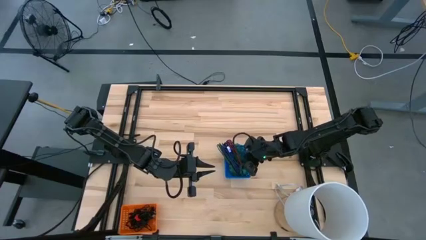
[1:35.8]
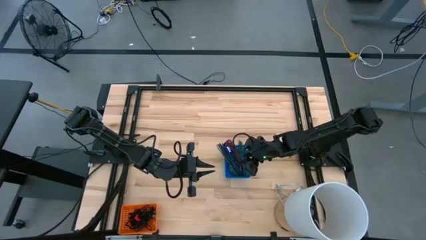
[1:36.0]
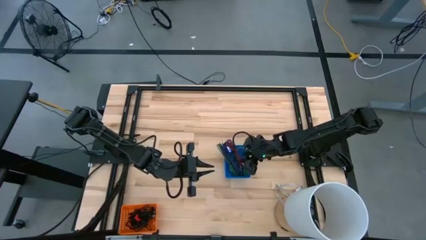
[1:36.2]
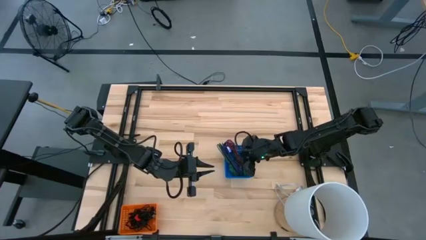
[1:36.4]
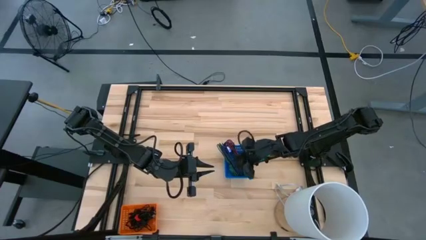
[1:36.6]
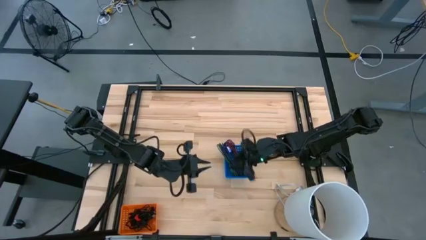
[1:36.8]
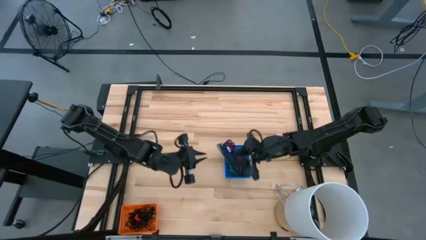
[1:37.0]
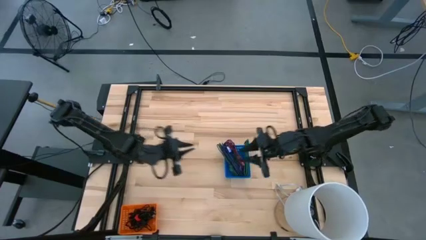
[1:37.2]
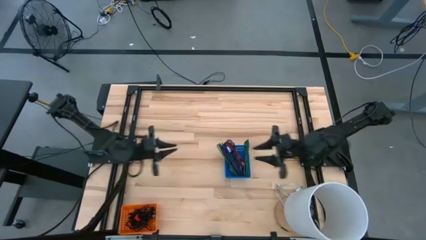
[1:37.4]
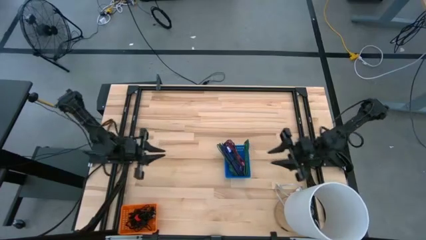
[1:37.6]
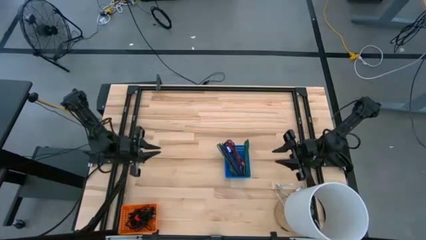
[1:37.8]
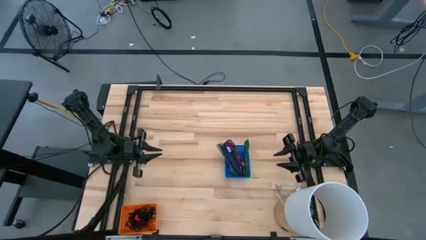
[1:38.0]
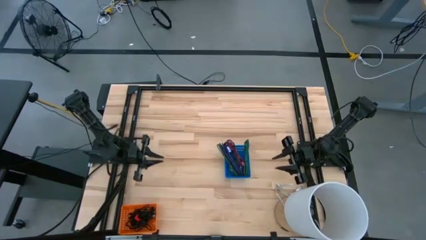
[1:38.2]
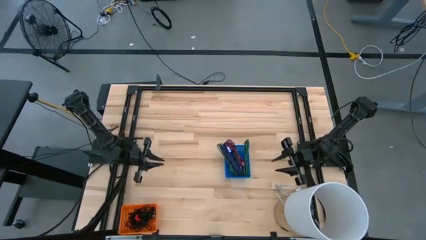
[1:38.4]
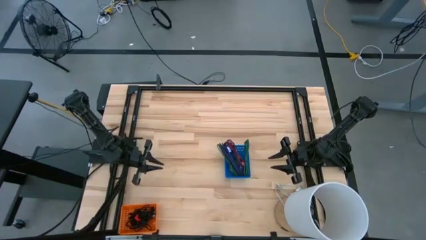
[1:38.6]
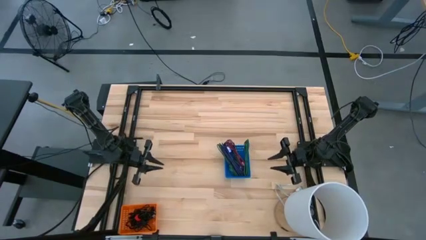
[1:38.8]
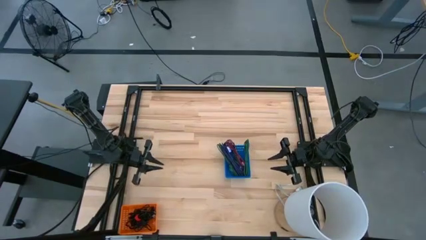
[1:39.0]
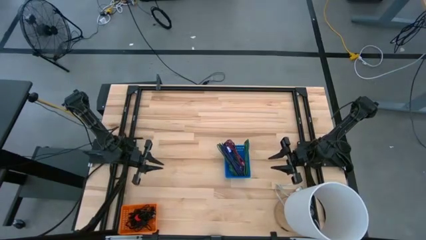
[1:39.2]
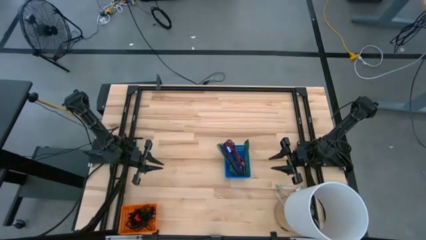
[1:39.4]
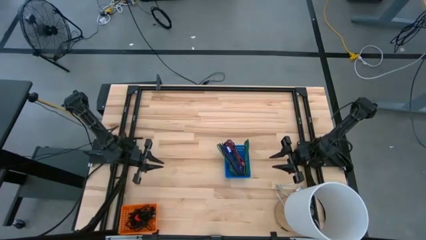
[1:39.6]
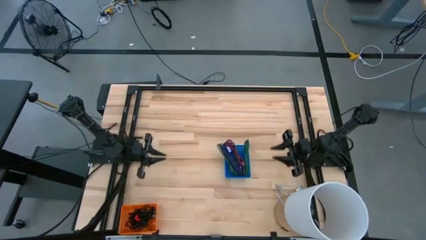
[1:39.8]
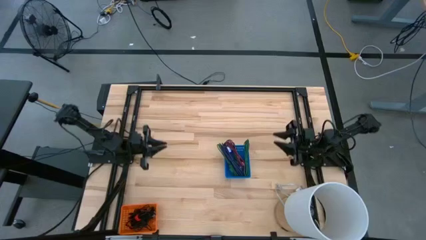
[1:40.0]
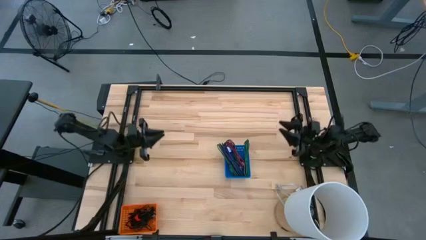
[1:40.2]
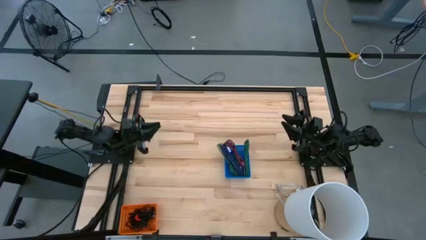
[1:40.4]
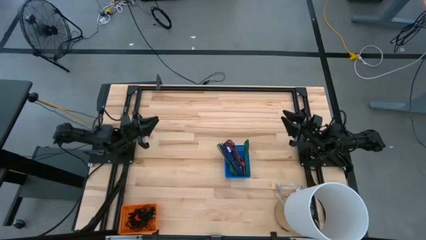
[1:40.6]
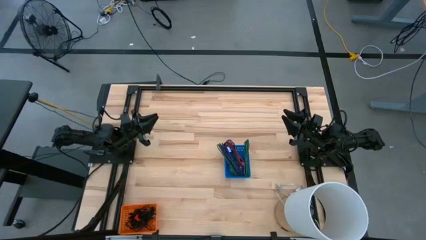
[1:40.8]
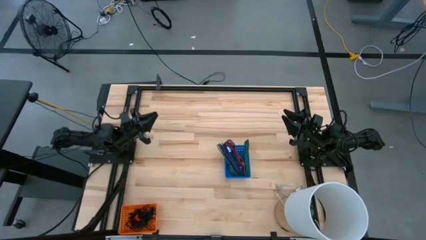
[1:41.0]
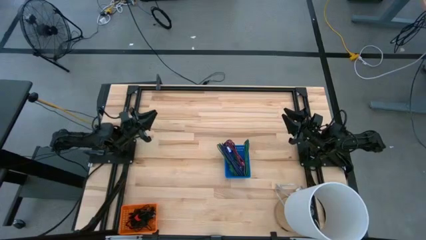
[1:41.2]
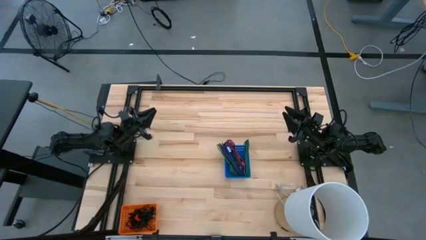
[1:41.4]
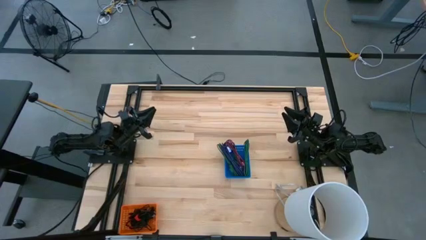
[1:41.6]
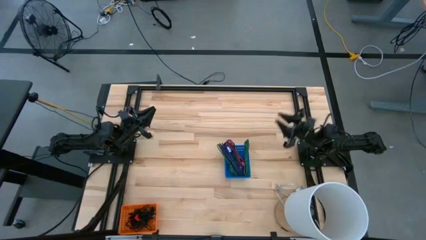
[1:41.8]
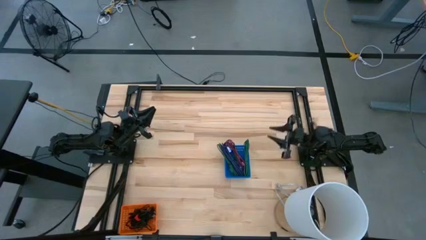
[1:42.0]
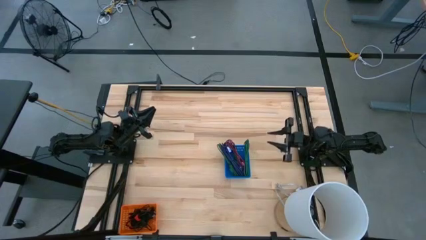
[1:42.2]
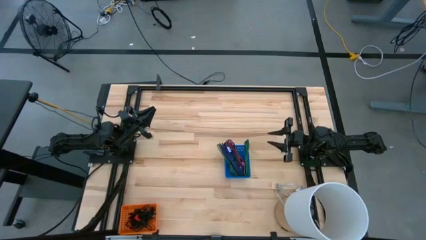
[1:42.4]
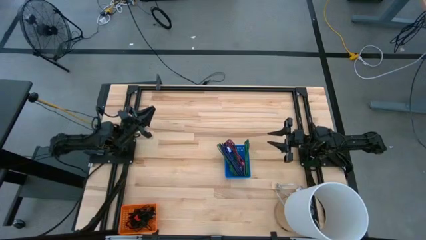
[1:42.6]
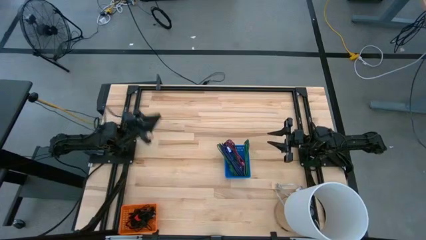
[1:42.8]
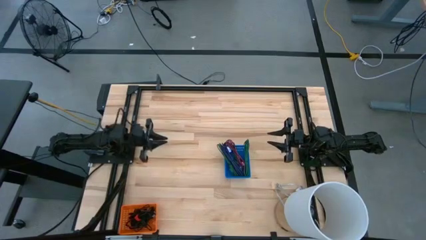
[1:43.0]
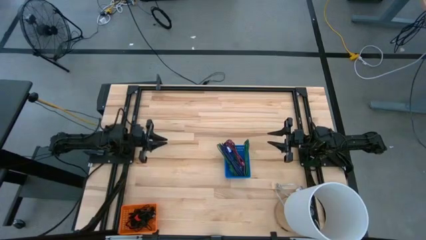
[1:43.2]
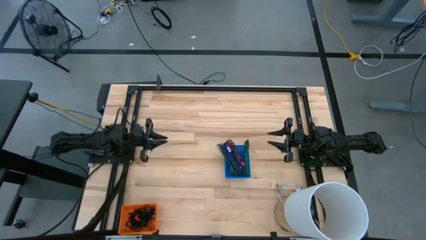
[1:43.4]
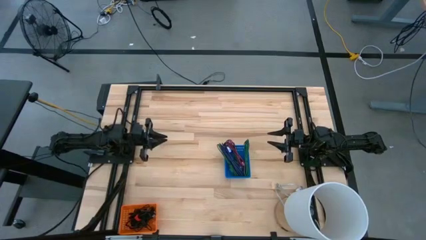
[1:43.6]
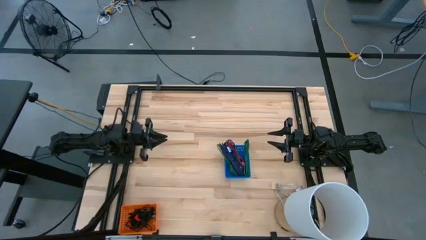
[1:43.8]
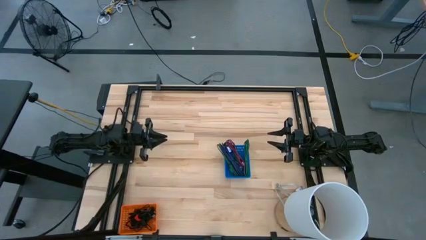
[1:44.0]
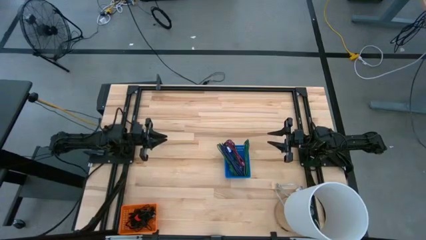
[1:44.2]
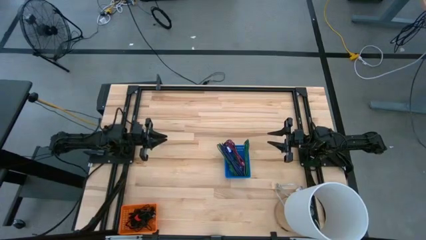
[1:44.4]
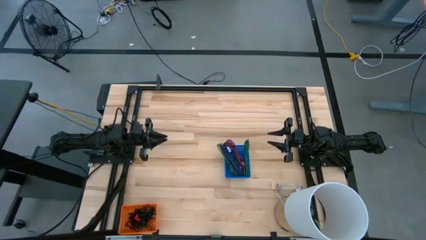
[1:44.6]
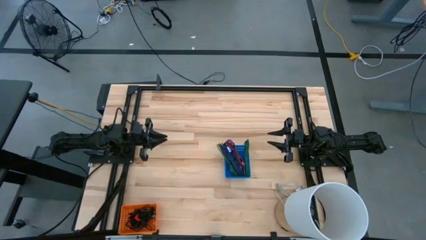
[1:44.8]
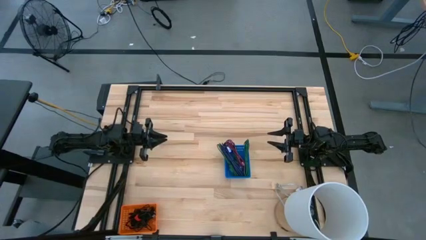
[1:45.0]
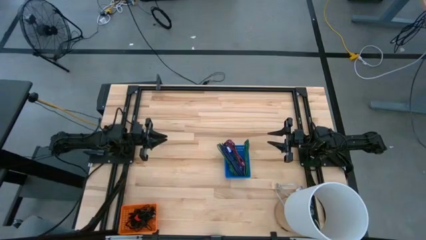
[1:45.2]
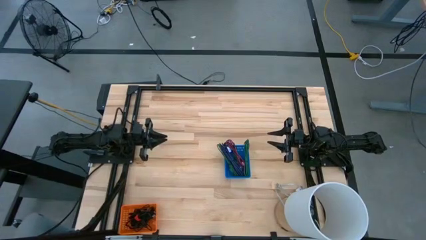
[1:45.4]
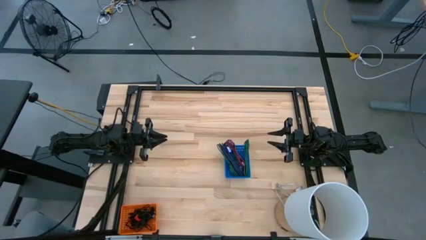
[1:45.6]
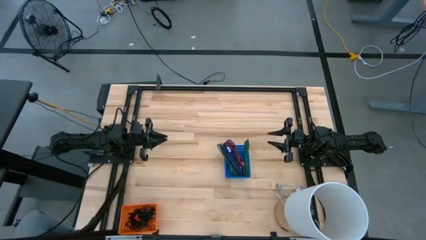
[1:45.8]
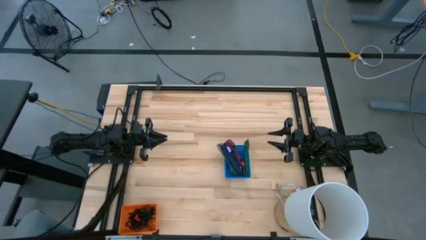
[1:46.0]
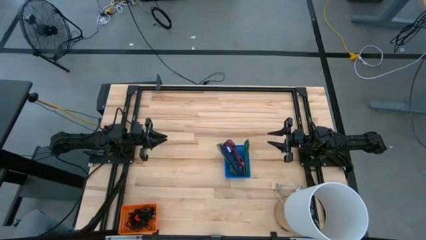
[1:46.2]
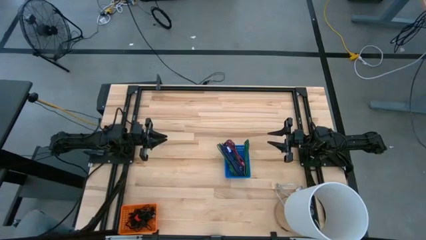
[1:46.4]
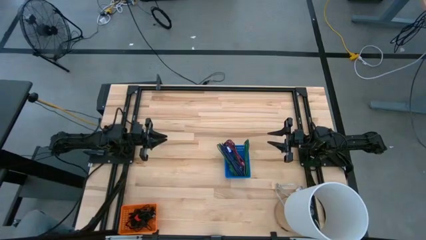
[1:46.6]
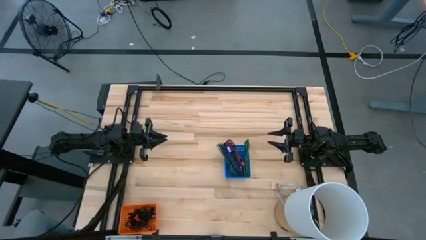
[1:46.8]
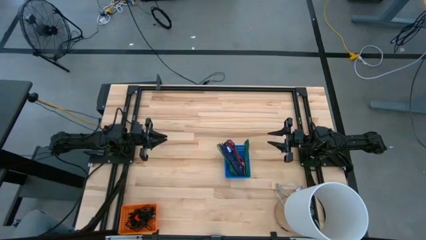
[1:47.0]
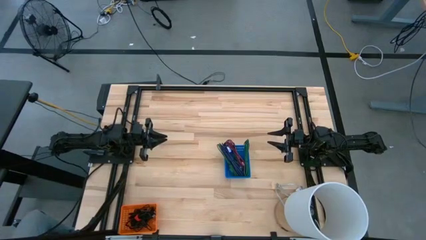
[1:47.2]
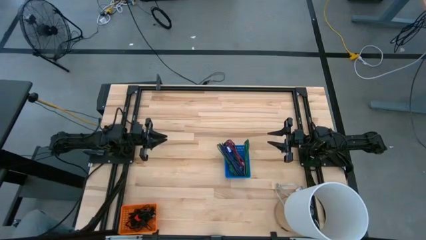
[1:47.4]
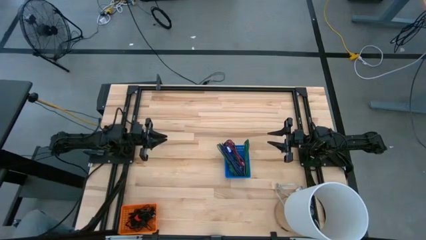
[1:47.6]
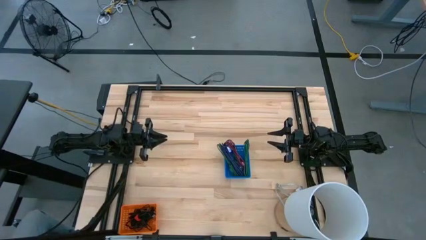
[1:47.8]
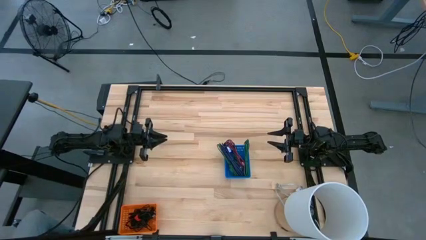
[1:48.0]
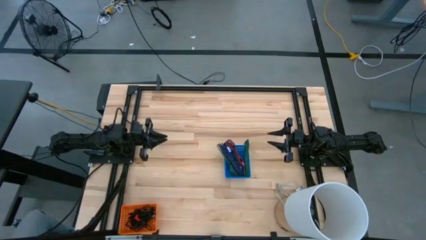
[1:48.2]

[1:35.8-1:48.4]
Task: Pick & Place USB Port
Return to Home Position

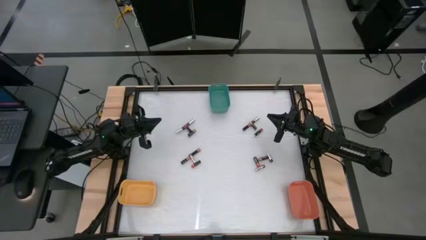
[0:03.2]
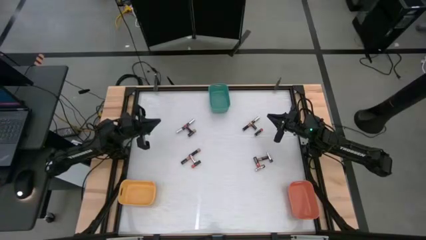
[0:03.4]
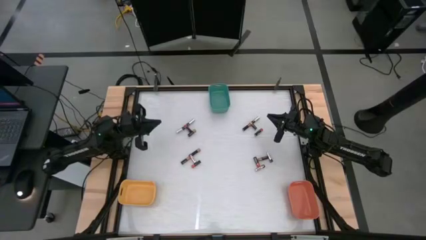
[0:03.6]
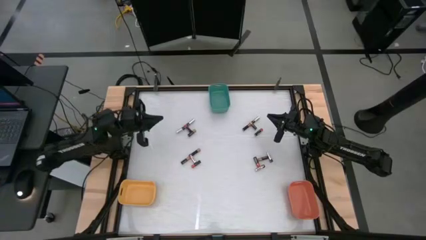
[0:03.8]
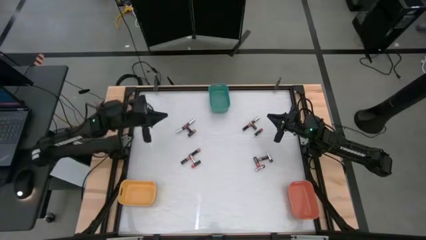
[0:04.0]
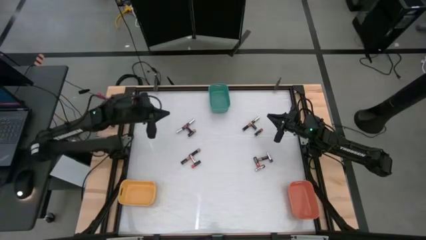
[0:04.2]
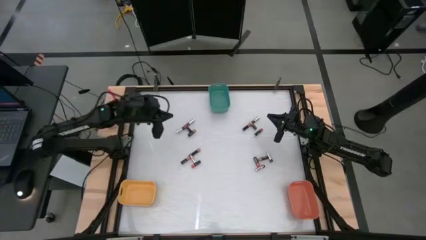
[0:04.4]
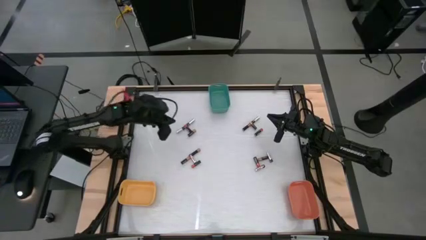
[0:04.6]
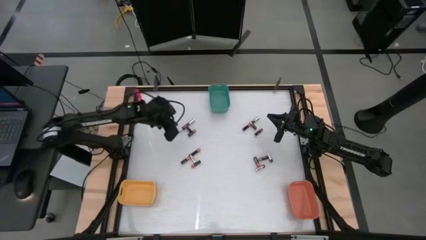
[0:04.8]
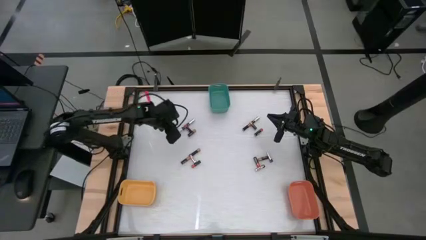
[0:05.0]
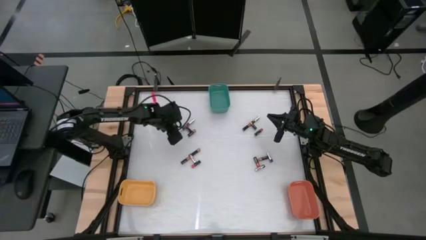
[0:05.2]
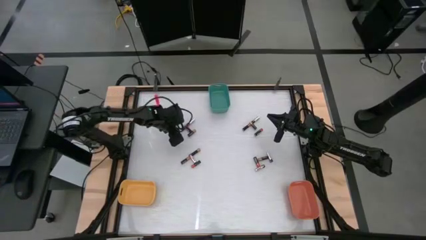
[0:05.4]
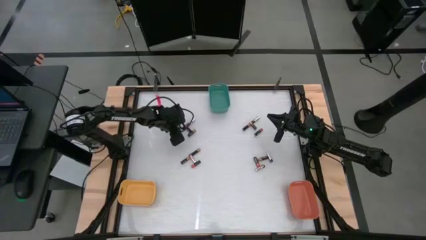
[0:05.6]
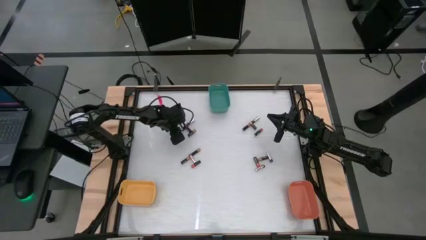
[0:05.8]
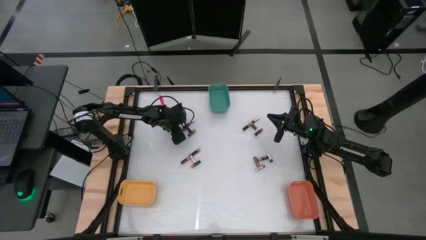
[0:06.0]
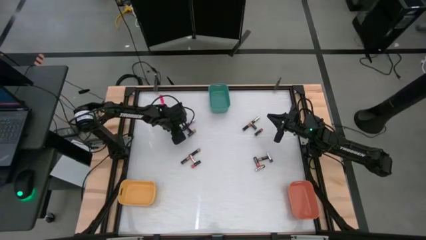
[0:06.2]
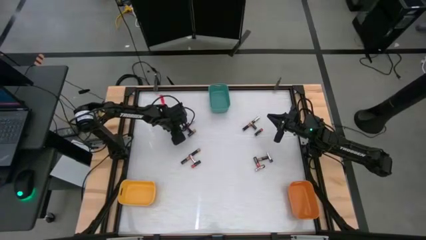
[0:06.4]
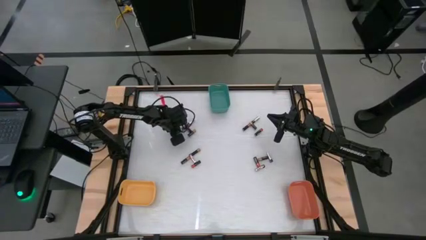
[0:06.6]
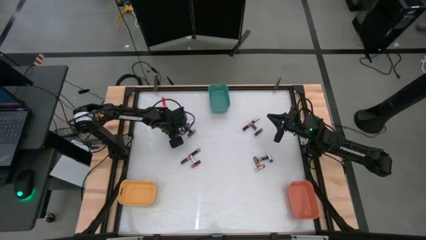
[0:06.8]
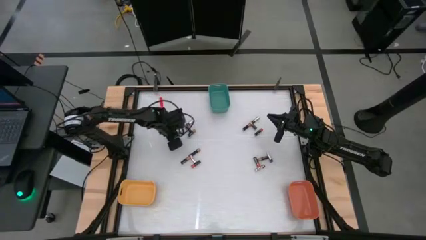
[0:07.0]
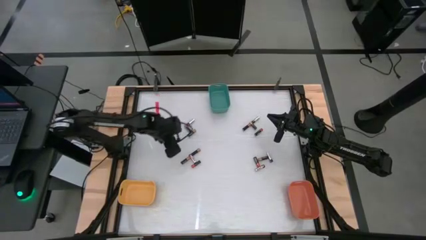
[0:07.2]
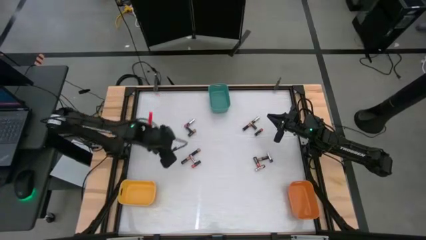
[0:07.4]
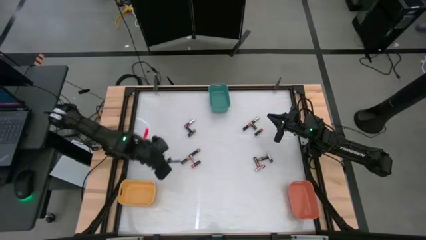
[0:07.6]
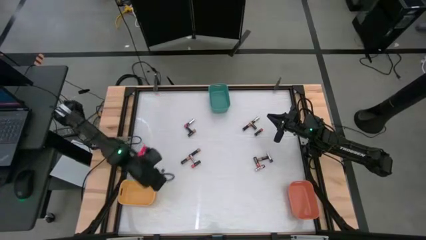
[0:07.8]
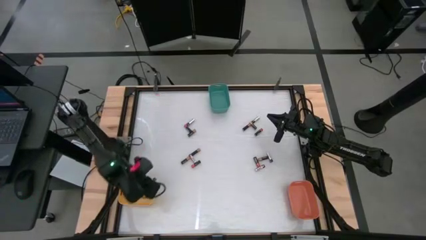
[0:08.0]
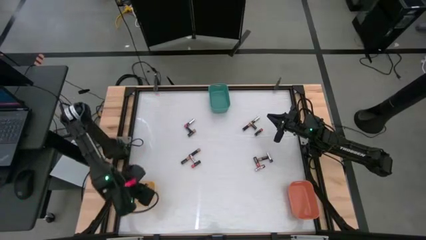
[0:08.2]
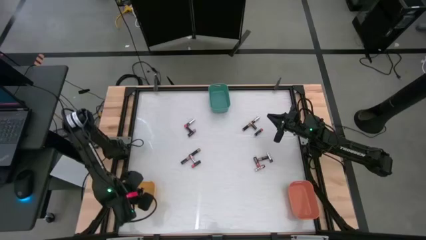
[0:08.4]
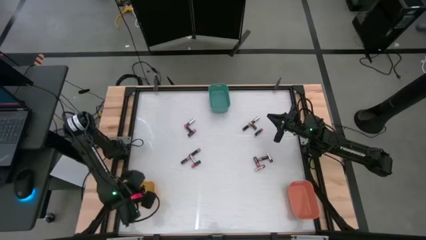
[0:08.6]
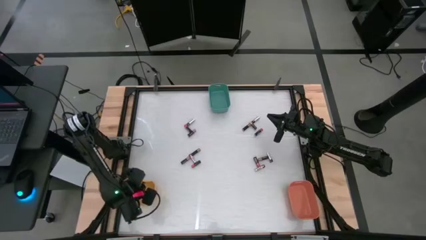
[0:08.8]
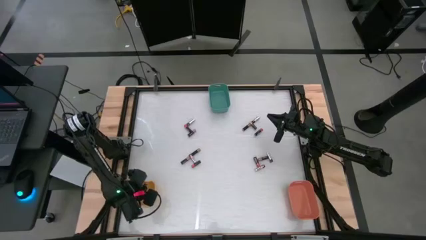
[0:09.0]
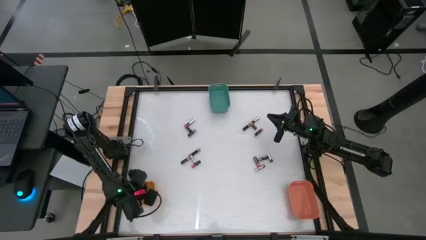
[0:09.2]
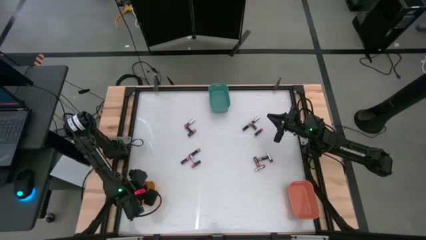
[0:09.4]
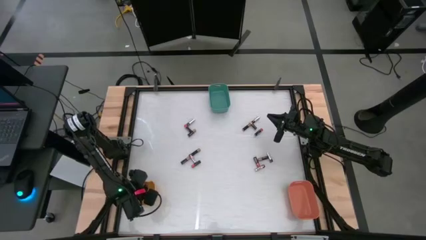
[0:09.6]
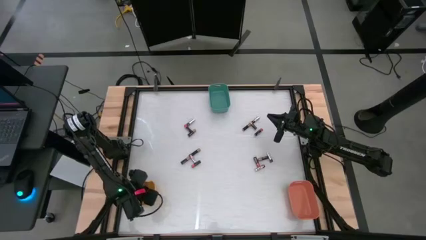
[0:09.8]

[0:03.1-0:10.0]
Task: Sort batteries
Put the silver battery into the yellow bin
